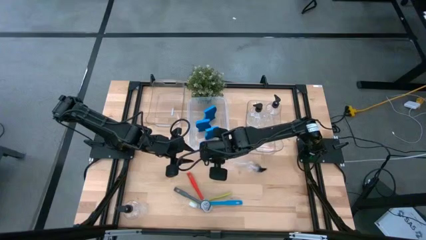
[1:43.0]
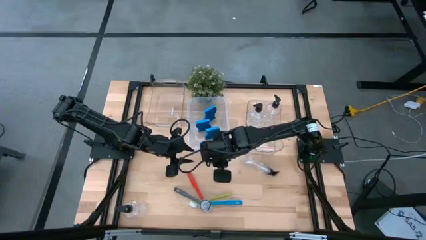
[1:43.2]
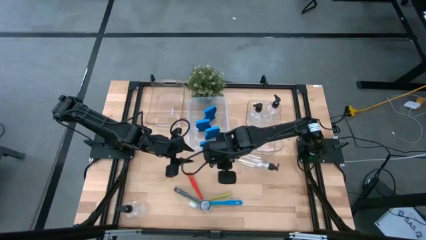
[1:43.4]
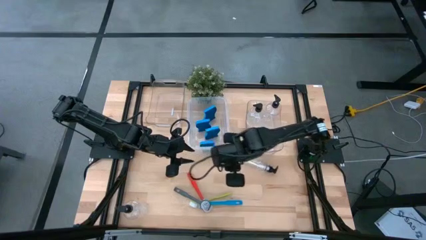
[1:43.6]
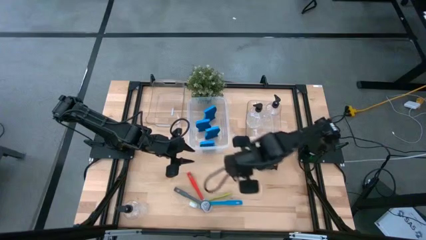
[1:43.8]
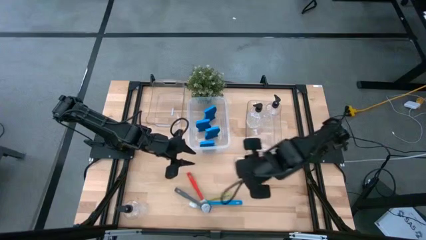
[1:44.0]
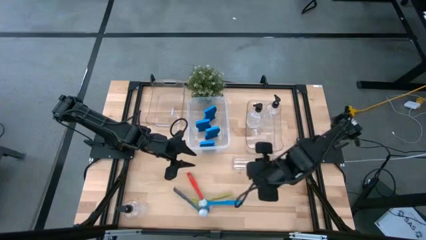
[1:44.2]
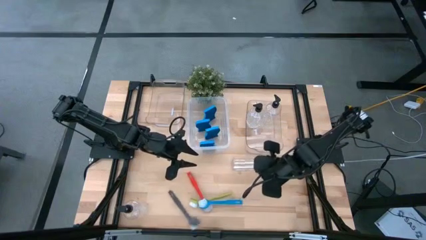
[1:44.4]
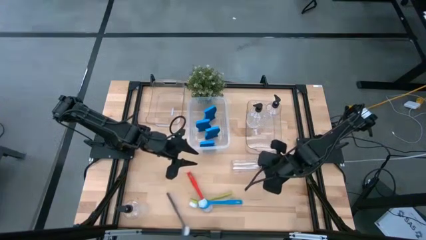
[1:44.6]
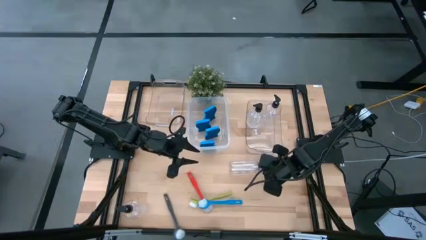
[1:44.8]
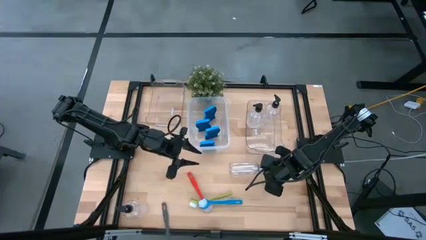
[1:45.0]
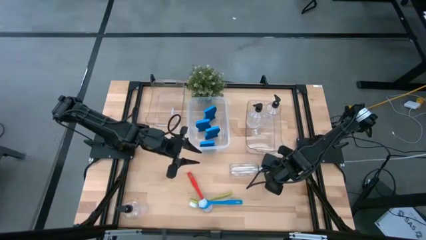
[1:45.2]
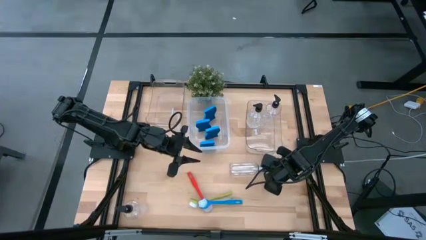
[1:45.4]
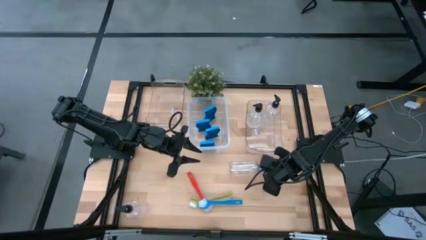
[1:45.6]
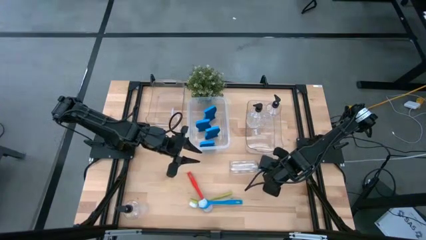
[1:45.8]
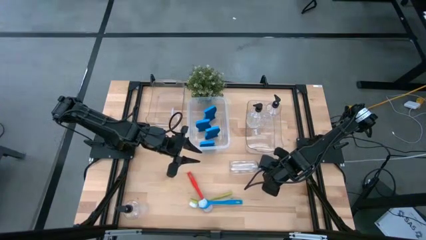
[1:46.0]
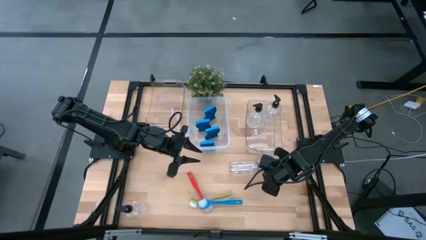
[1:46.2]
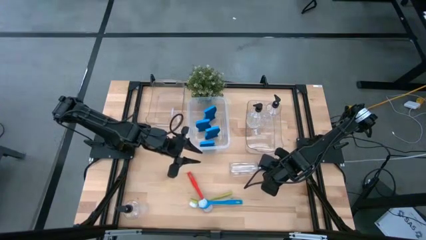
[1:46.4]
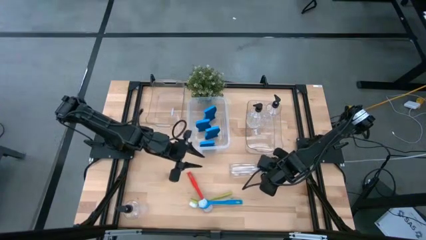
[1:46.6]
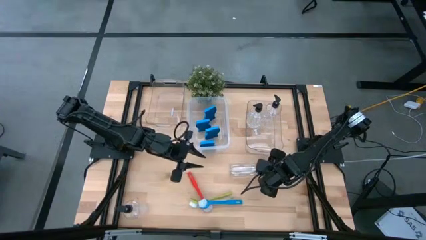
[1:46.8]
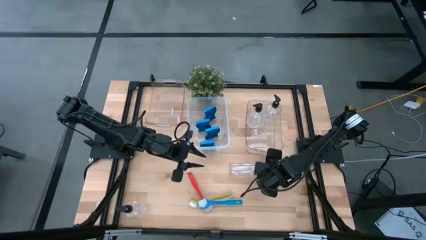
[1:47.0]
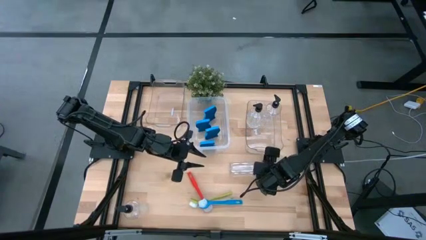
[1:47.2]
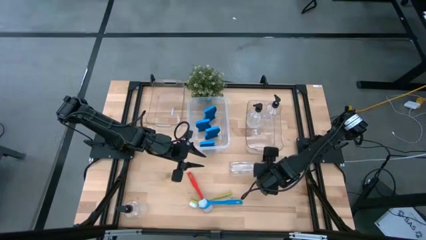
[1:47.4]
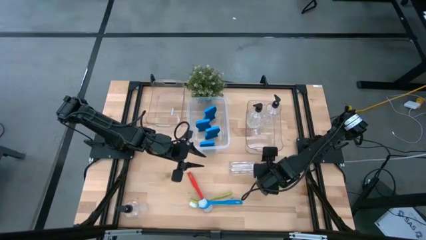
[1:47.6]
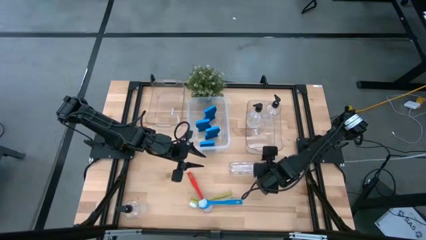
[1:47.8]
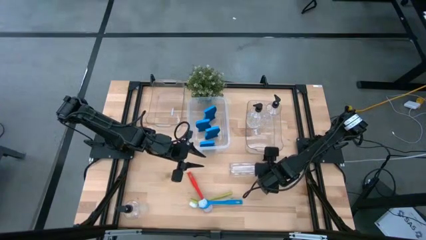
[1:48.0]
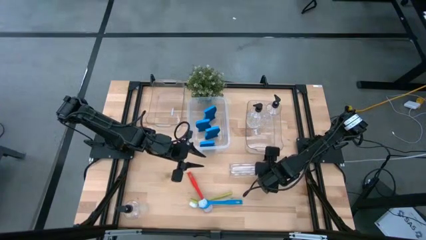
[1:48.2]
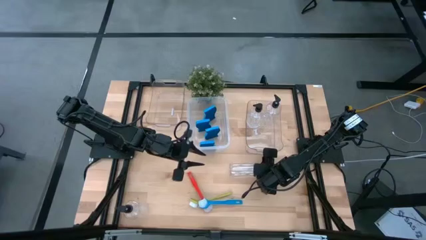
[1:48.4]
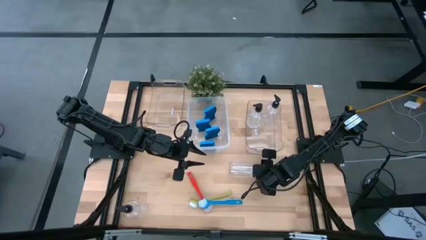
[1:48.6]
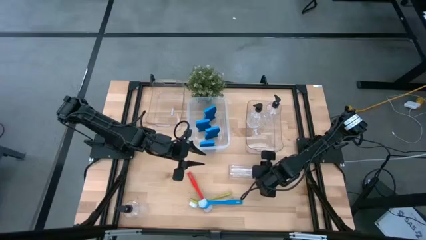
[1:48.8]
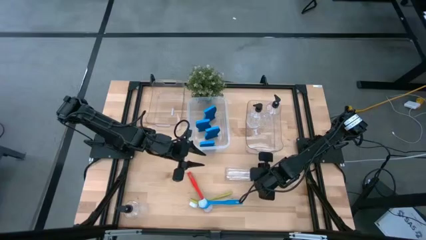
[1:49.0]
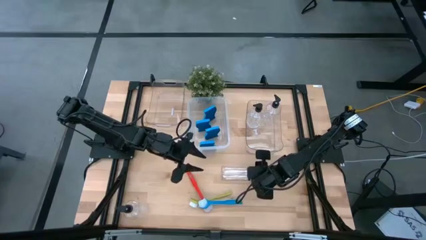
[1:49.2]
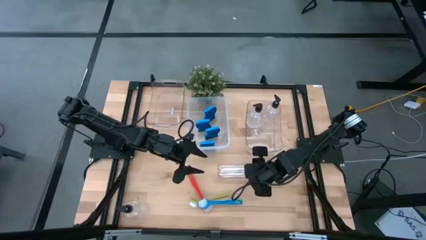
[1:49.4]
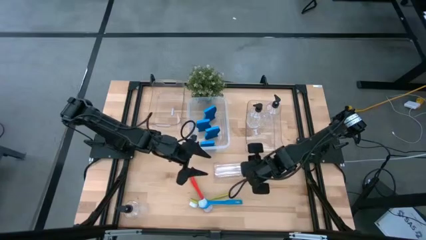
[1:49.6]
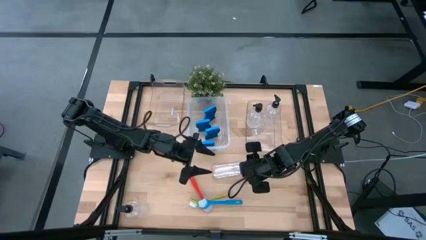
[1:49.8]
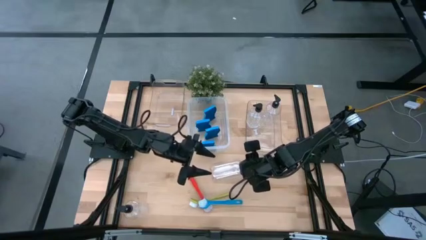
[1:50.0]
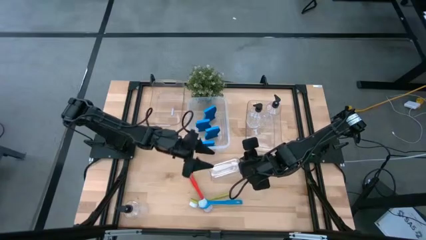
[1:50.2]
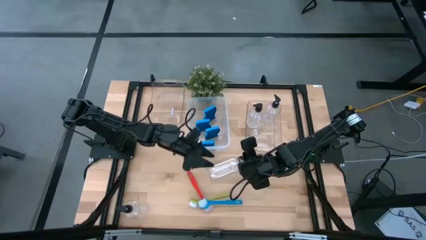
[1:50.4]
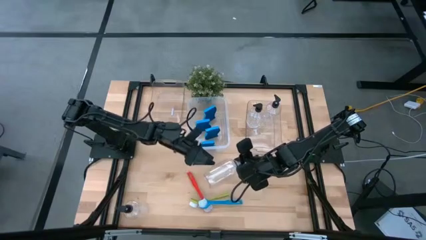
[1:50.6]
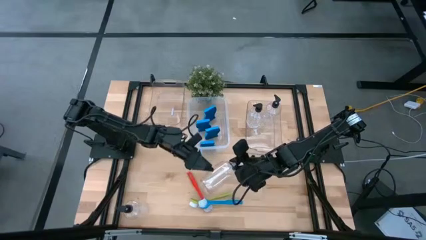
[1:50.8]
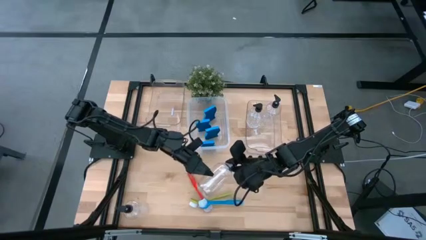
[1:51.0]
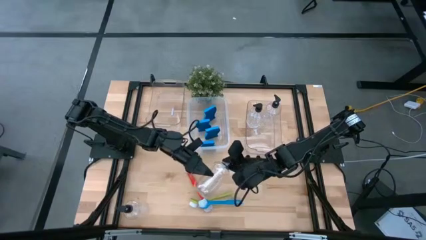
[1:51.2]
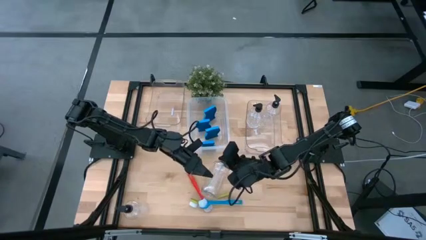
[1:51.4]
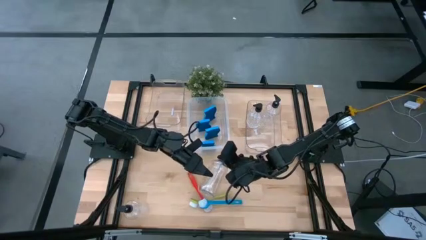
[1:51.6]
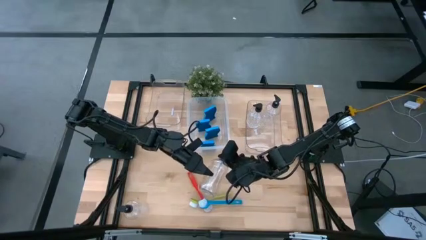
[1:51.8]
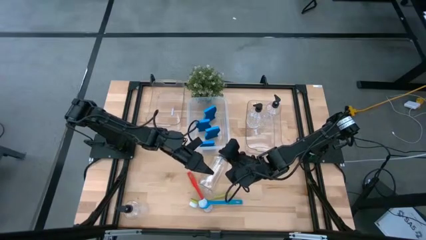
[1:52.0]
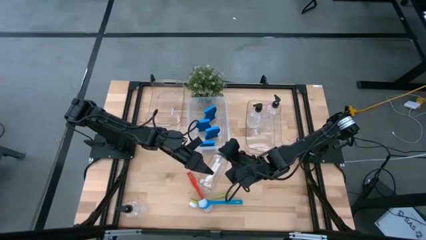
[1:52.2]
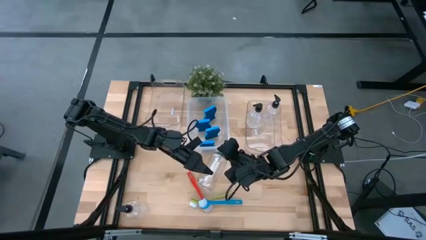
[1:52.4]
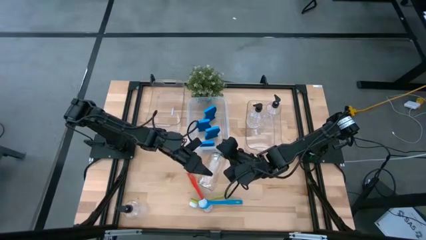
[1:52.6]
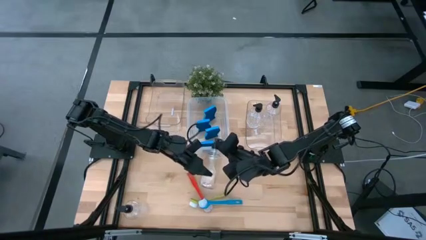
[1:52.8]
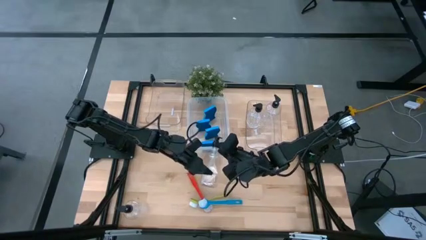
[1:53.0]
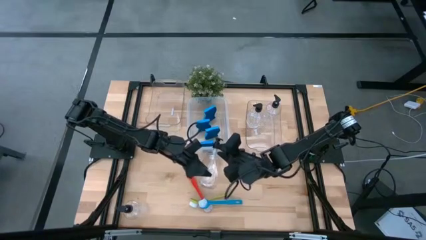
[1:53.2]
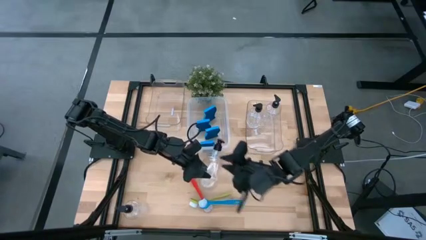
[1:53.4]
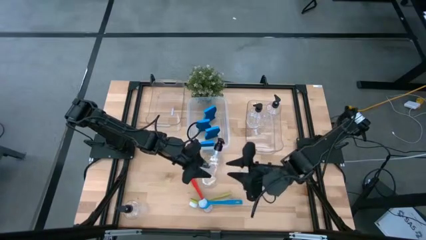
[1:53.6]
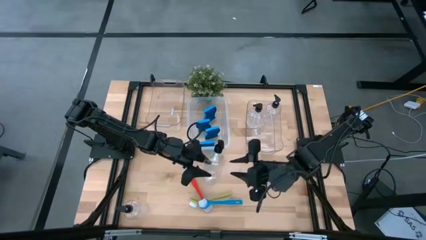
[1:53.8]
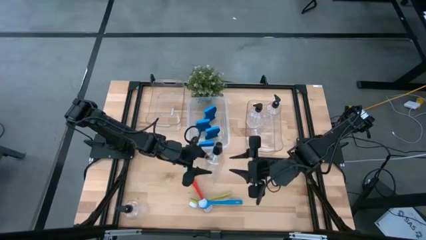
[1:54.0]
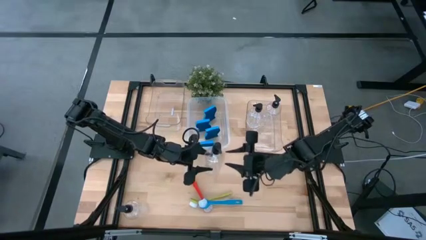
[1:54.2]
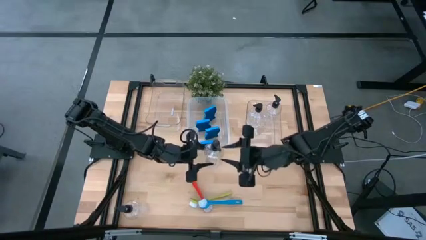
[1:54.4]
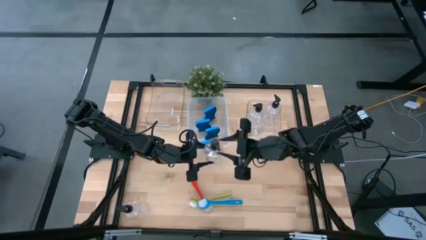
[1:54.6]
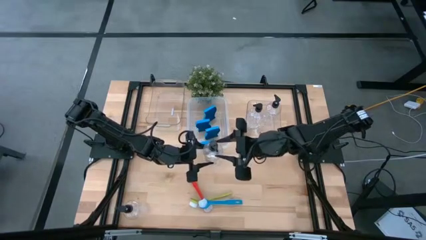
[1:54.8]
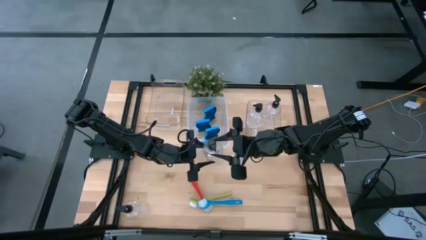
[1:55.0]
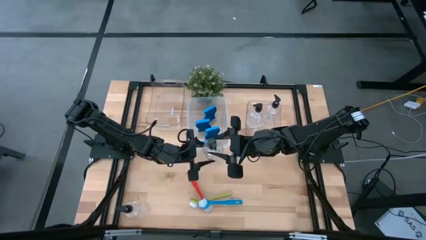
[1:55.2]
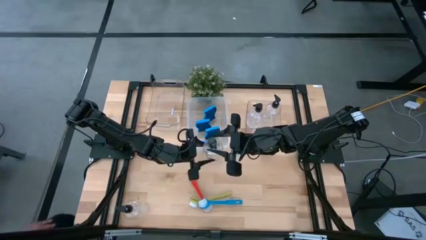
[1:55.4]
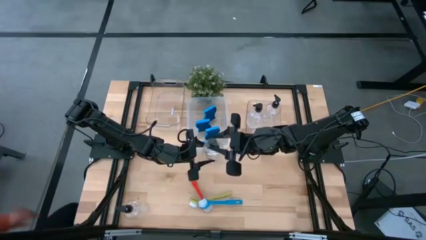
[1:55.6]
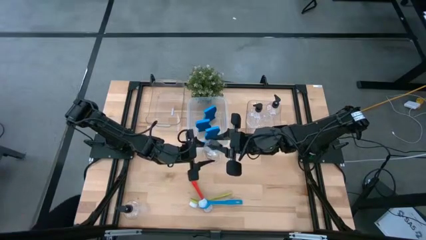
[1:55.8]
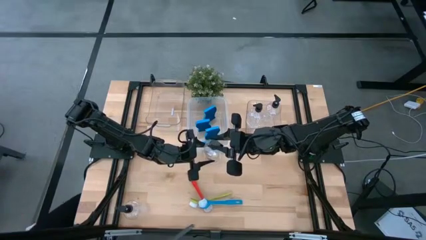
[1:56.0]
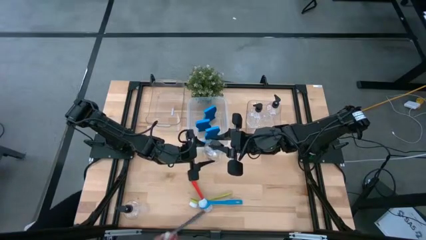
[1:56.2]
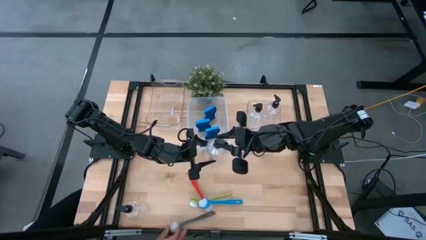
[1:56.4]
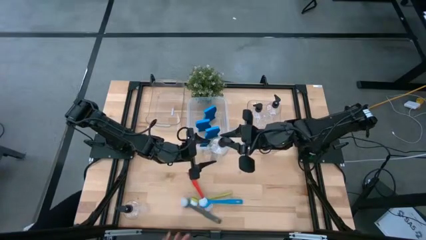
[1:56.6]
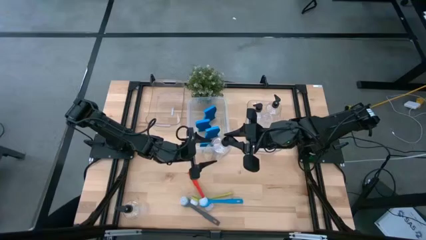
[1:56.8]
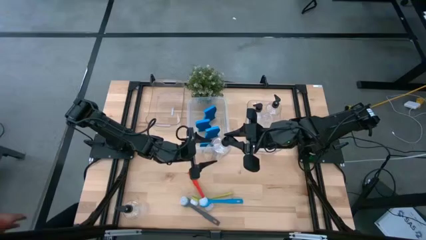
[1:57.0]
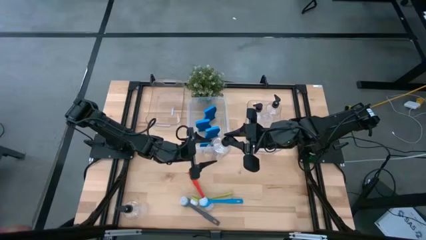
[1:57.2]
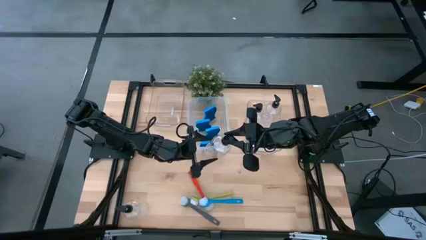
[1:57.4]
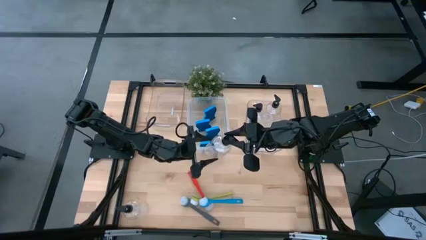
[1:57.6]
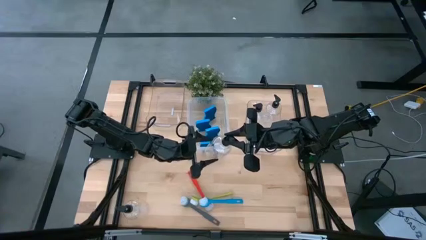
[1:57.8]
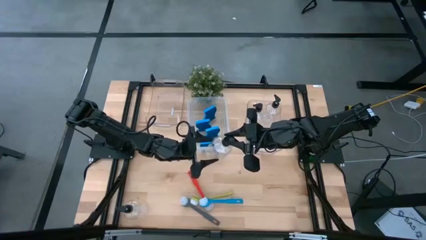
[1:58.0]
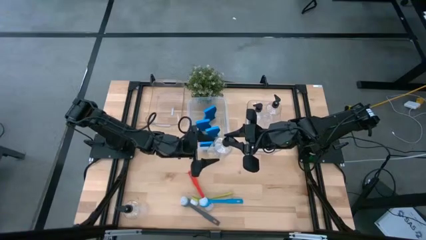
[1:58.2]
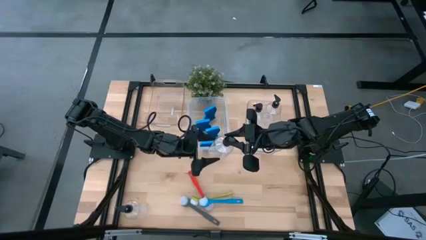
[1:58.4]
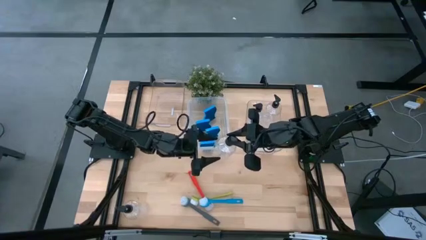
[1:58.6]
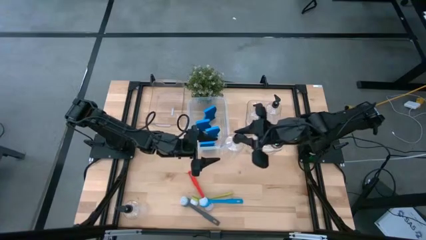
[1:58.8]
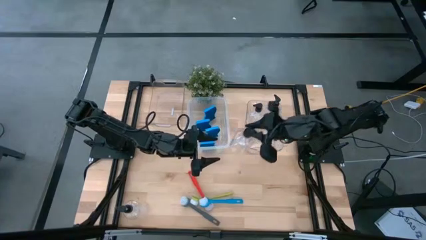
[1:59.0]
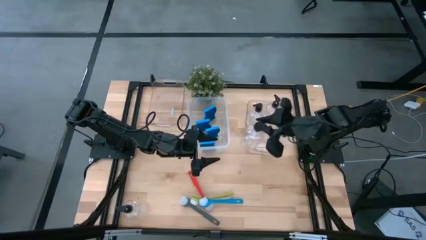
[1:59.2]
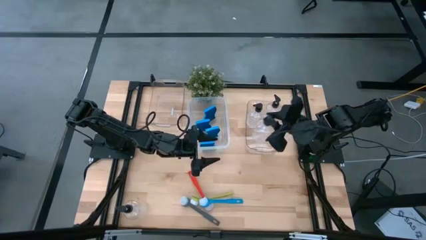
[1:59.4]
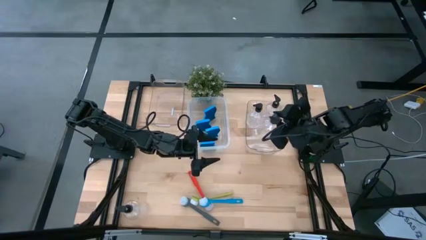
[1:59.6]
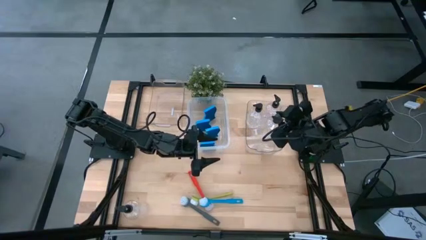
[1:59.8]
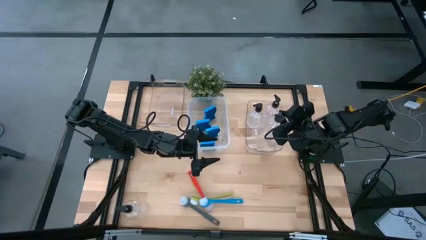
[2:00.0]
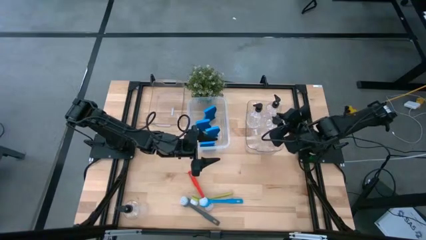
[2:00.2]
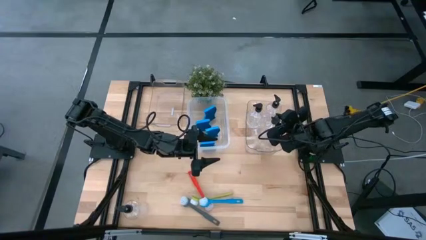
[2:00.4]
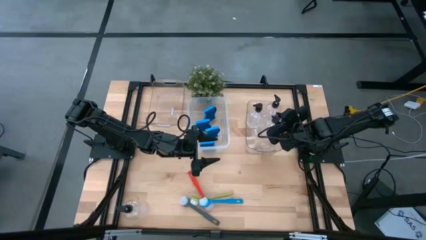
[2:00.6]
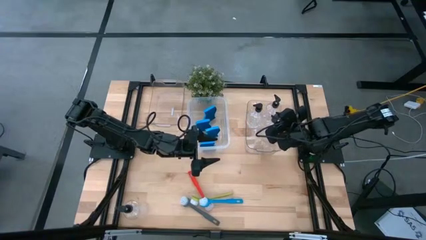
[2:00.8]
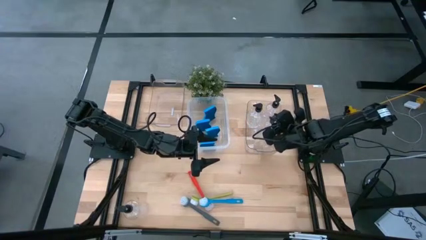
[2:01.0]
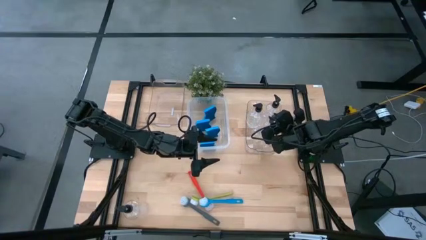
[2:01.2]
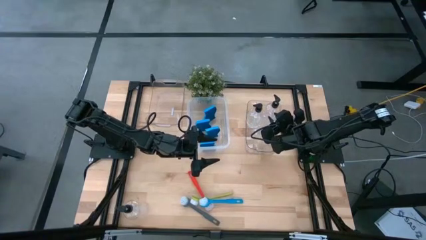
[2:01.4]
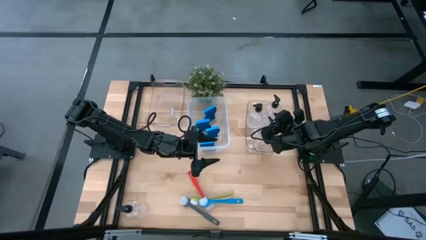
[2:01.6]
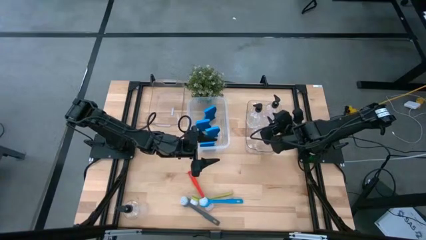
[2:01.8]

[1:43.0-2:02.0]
Task: Pick & Place Kitchen Sink Supplies
Put the transparent bottle into the right transparent bin
